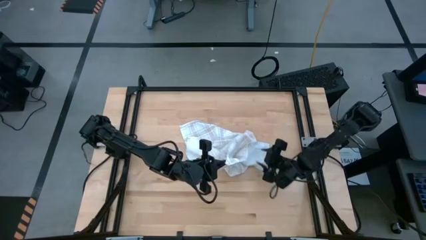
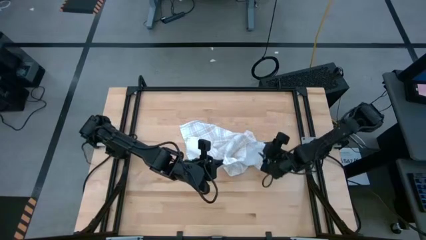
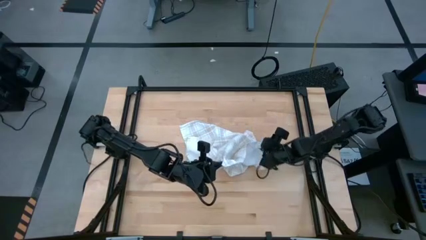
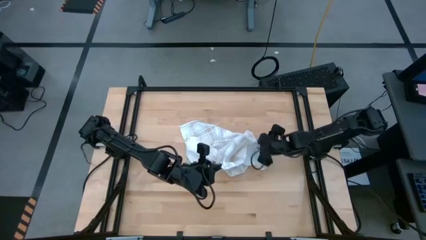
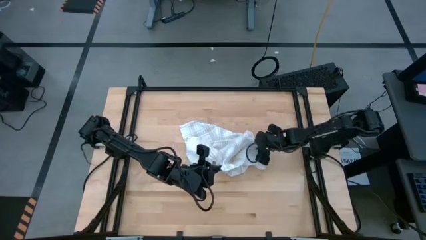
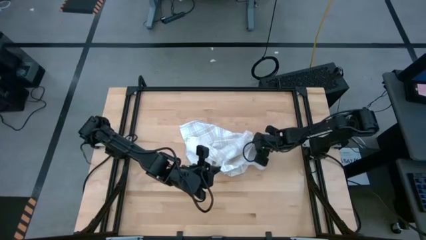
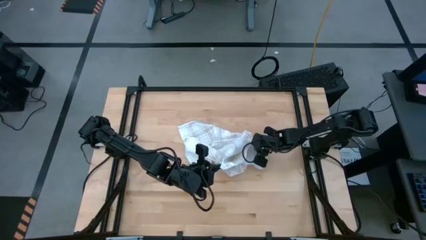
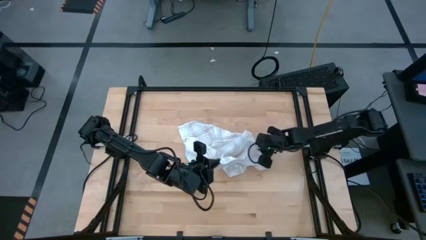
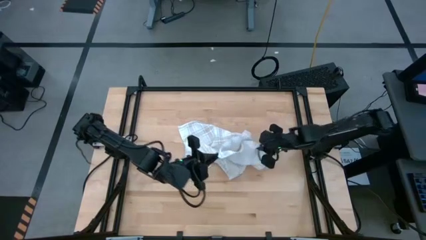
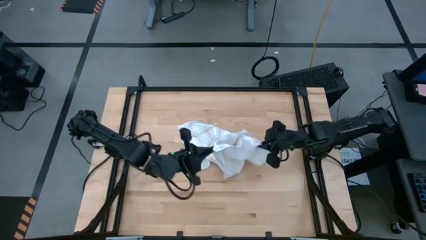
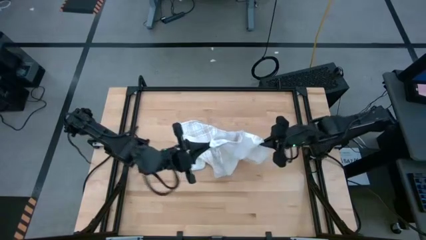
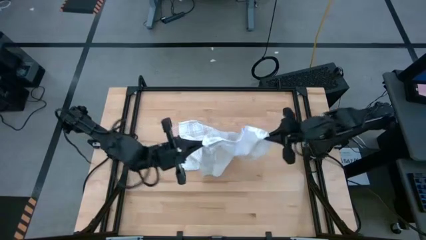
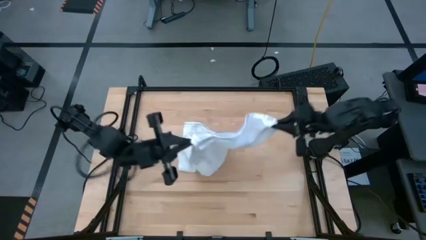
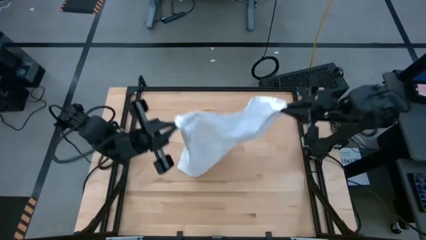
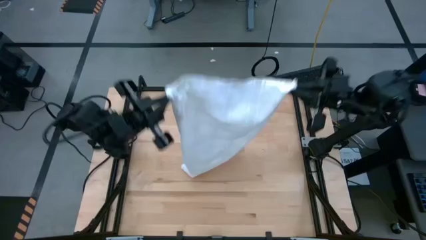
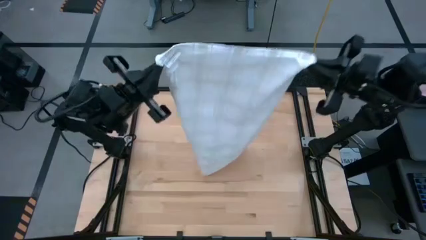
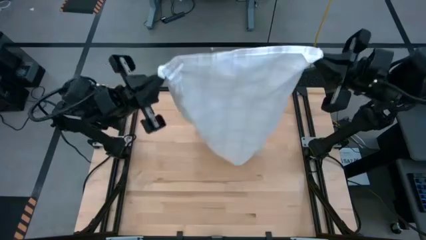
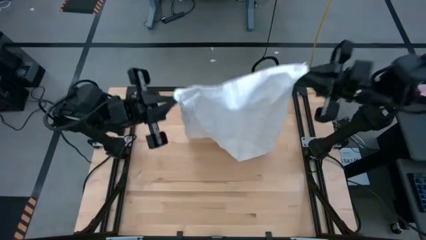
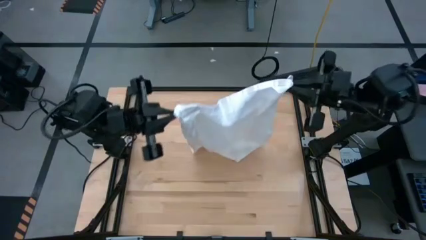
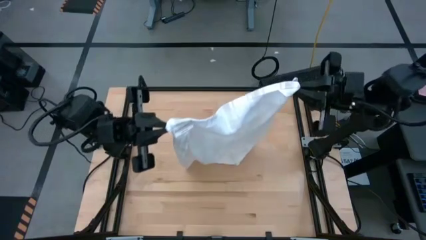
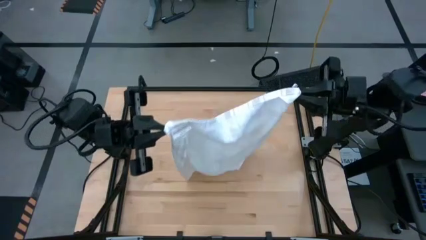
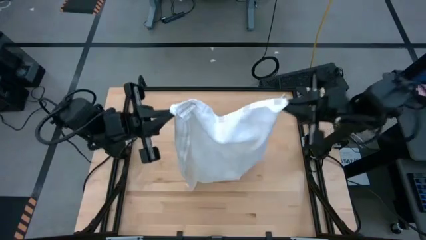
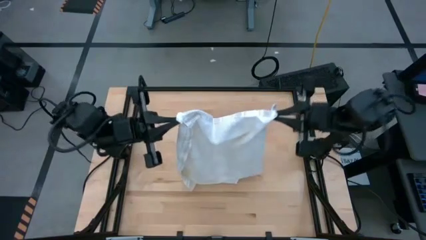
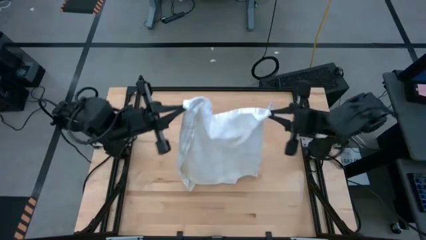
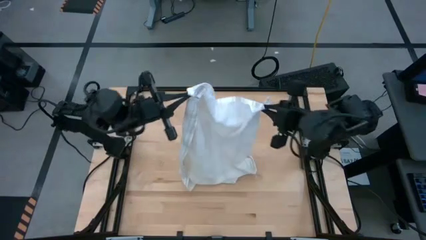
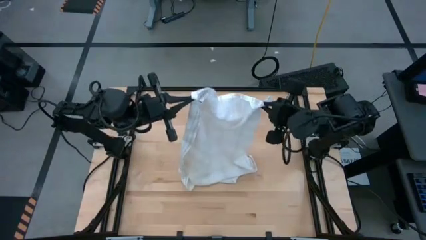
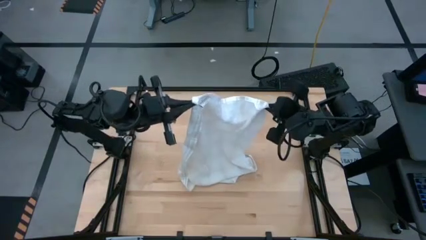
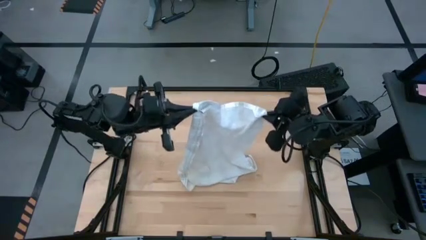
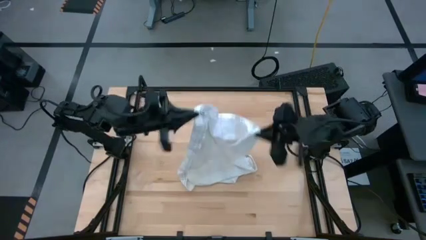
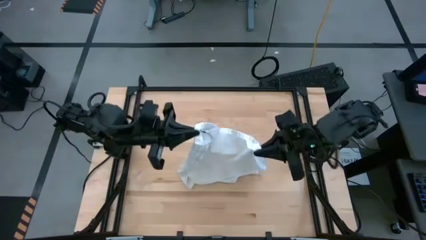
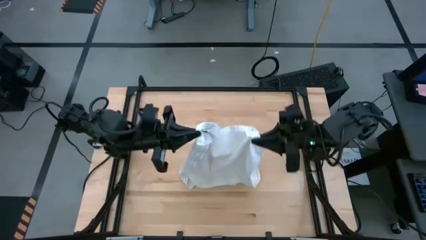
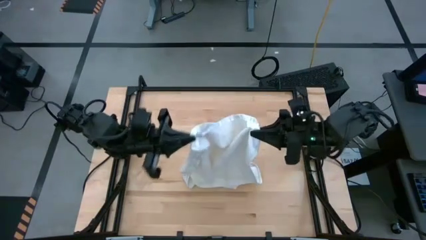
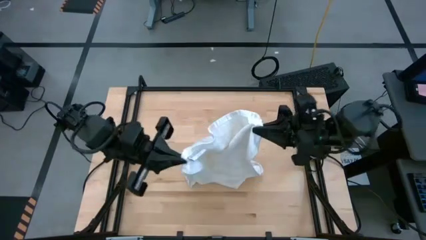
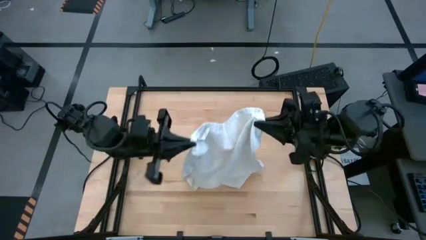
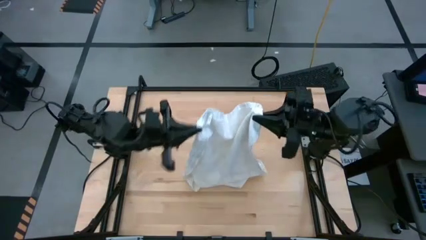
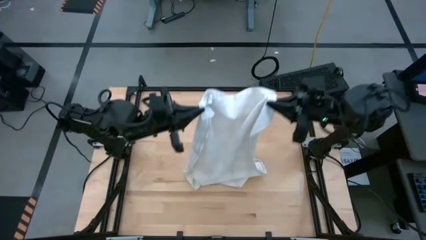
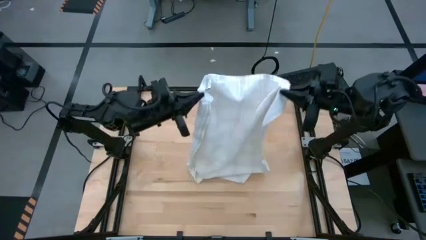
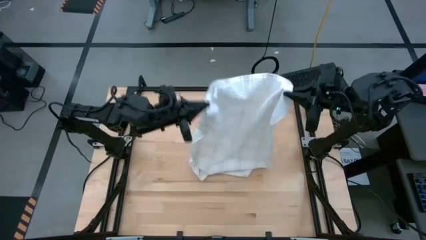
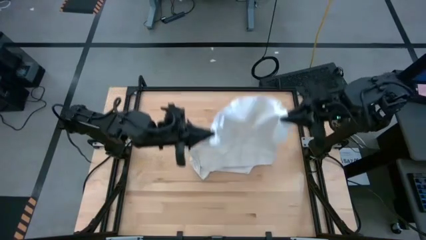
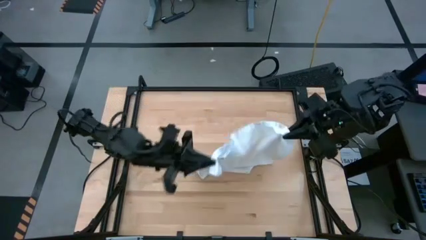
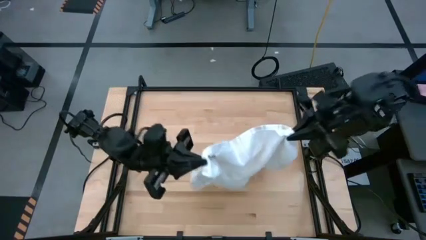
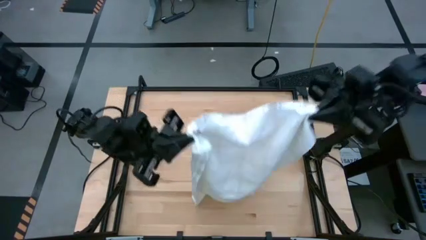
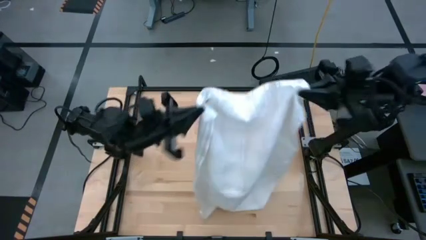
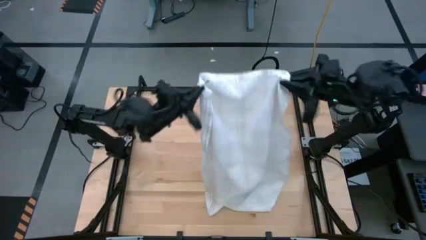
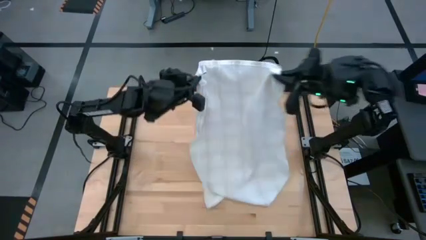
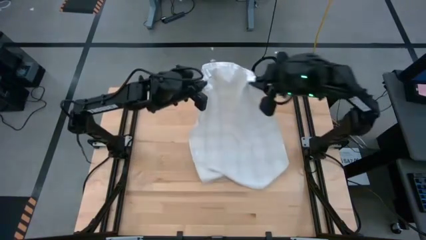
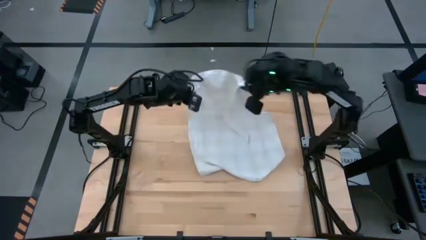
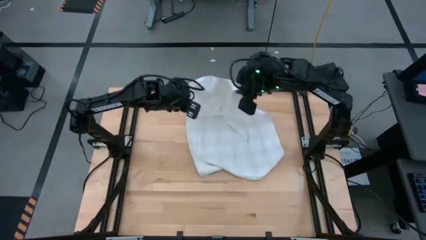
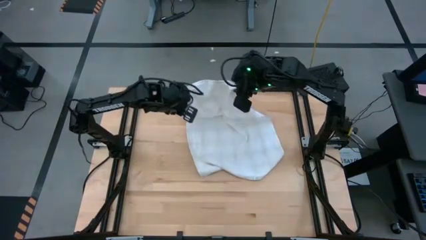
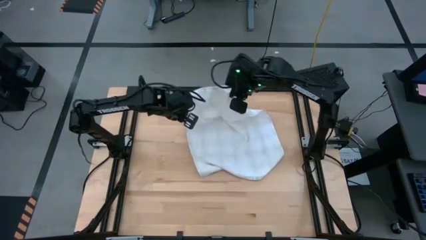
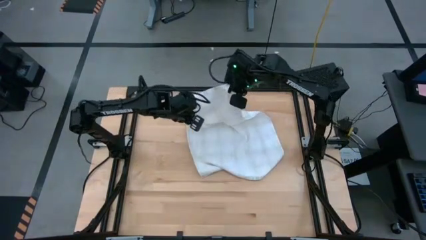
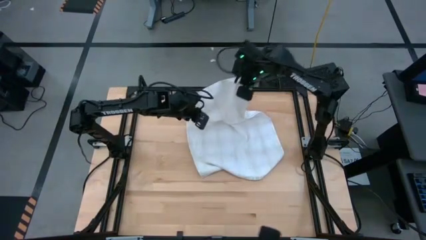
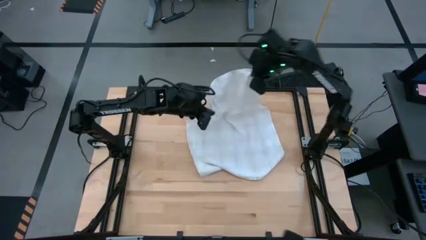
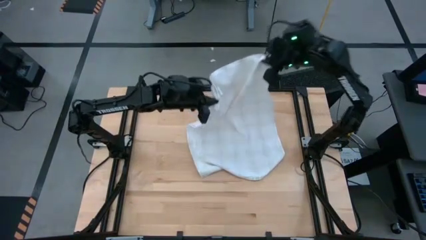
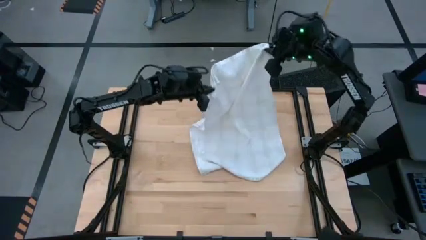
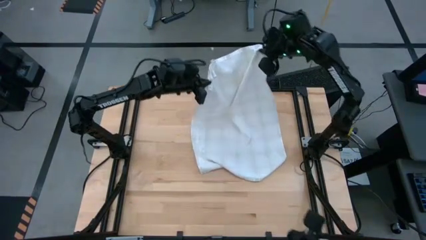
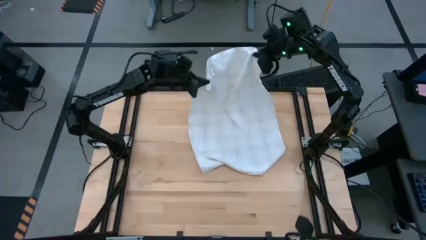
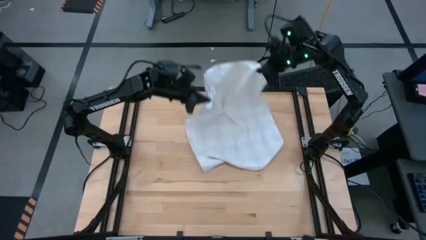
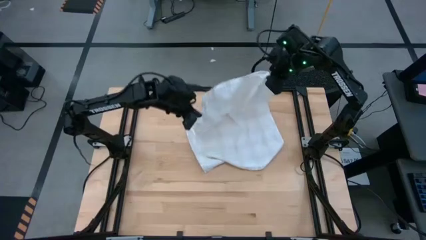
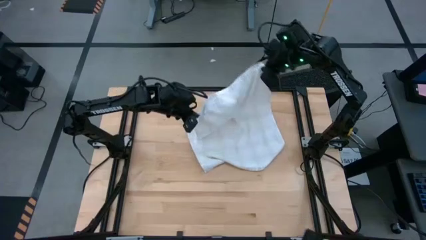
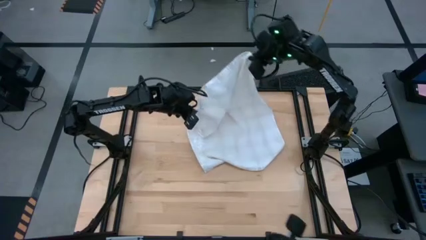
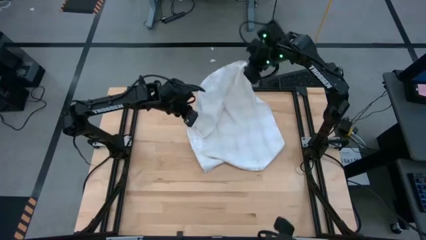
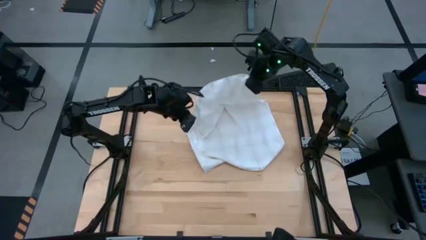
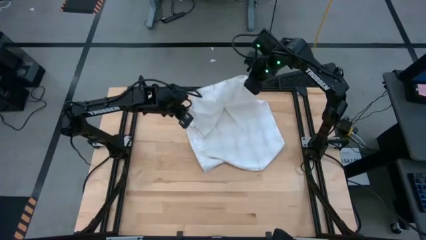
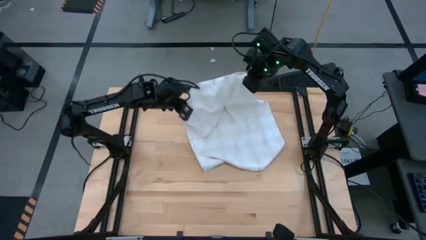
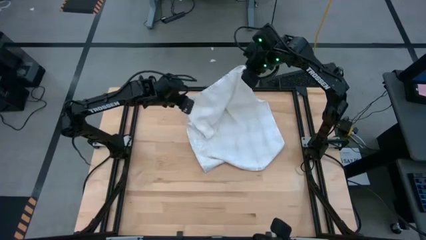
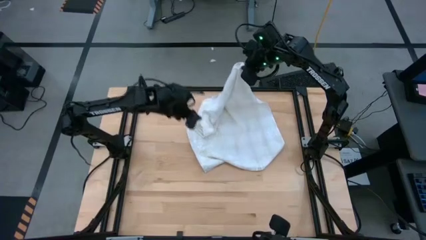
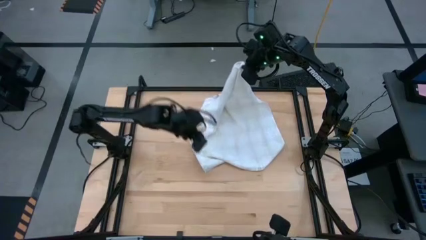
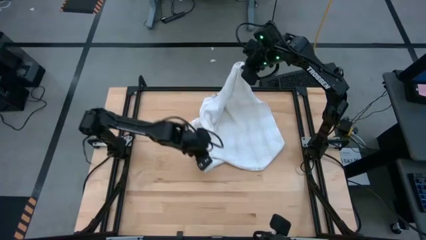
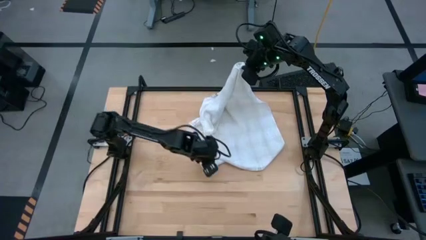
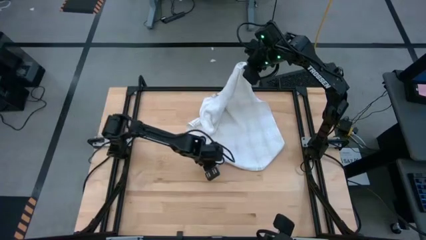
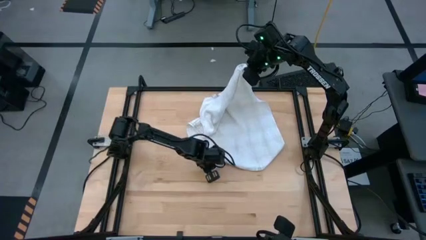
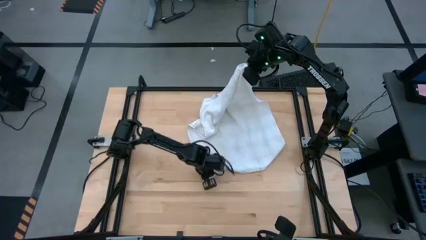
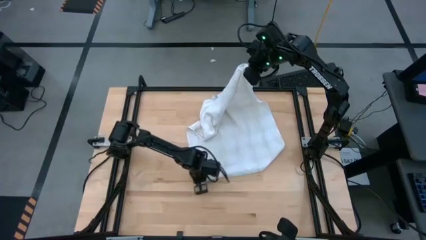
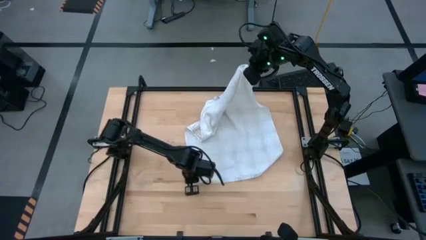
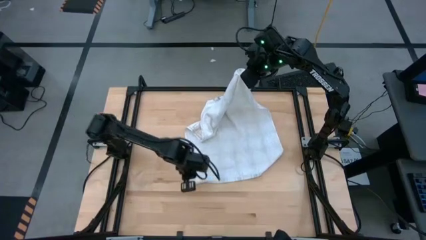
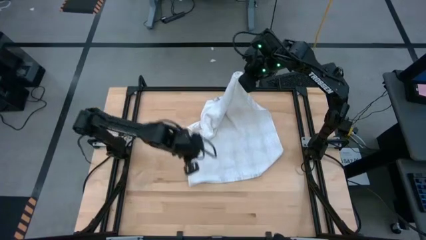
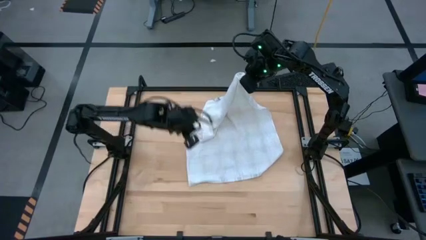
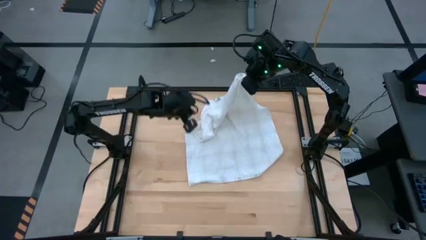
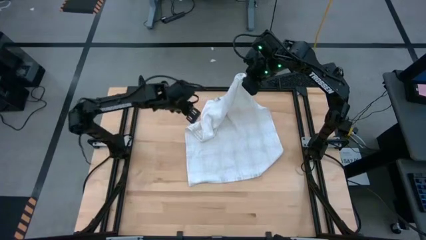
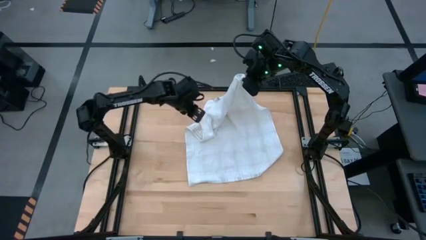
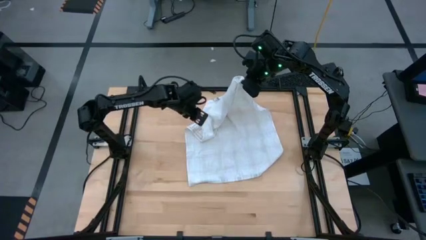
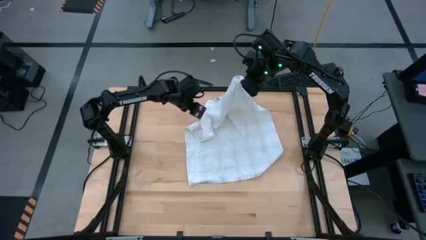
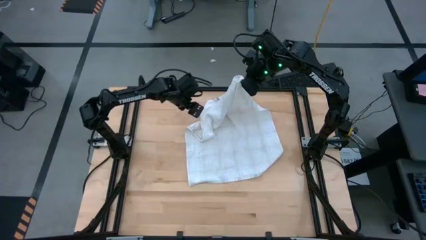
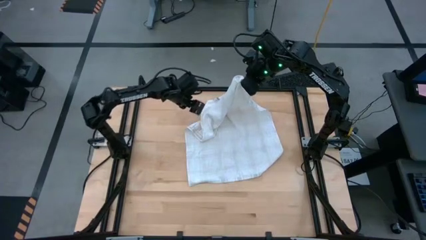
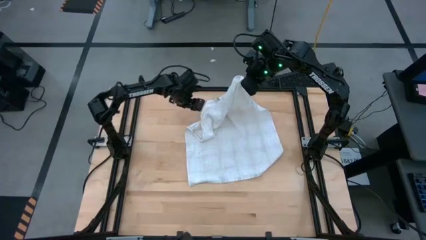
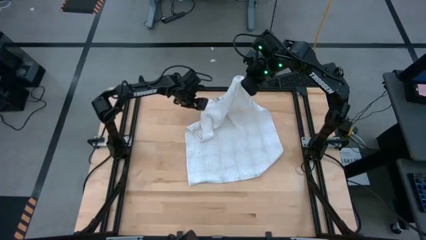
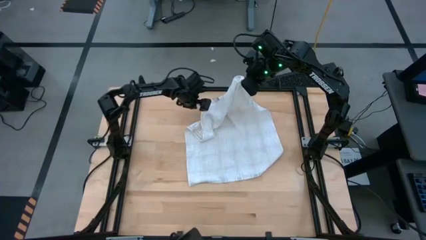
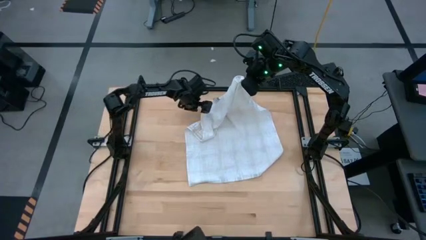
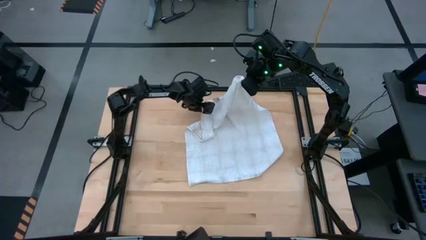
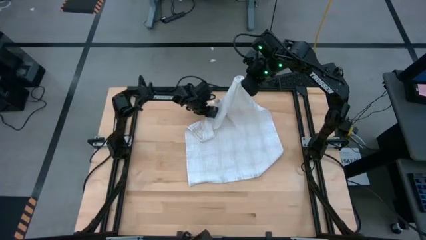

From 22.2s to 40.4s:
Task: Roll towel into tight, uniform cylinder
Roll the white towel
